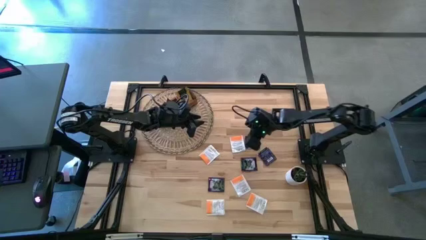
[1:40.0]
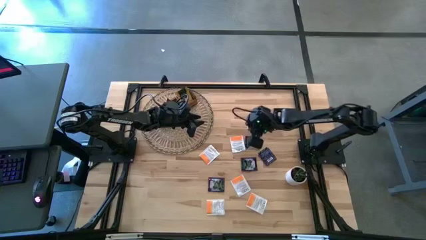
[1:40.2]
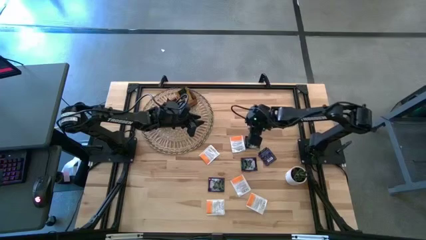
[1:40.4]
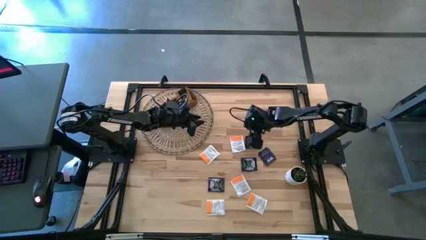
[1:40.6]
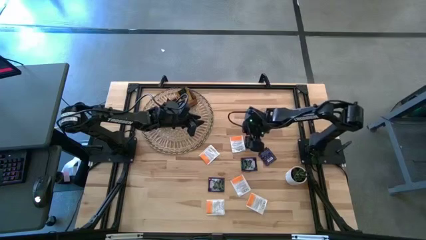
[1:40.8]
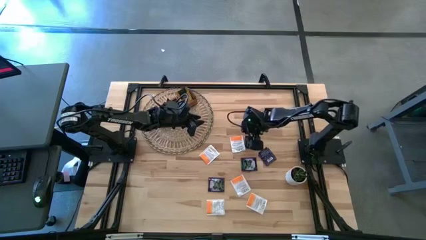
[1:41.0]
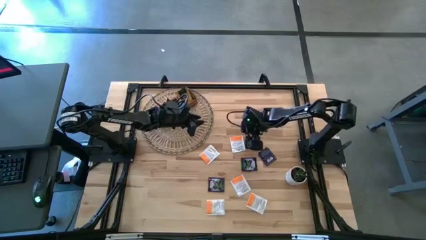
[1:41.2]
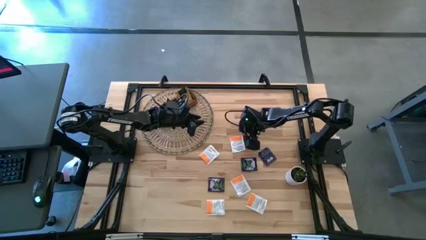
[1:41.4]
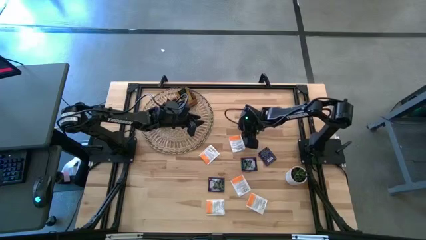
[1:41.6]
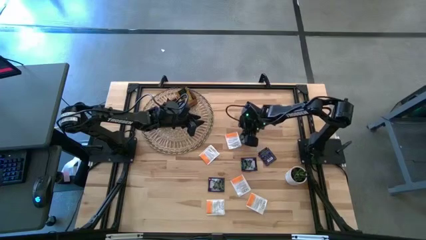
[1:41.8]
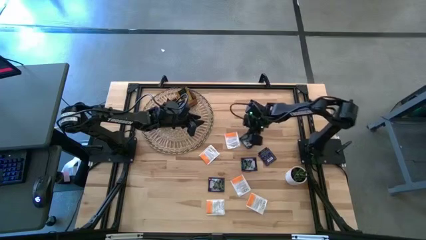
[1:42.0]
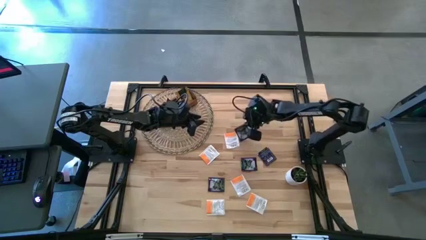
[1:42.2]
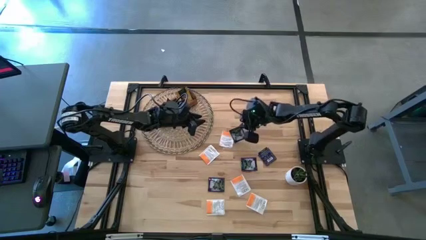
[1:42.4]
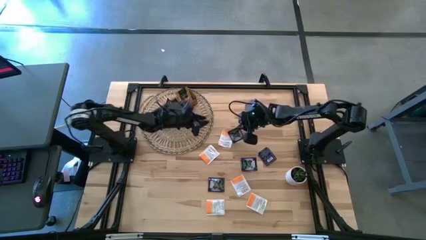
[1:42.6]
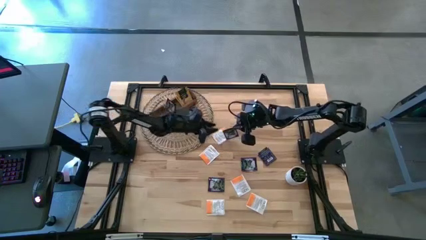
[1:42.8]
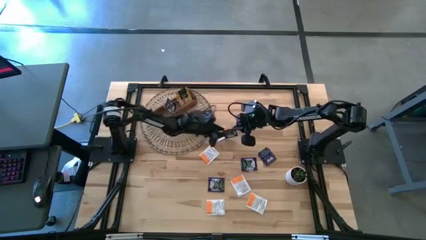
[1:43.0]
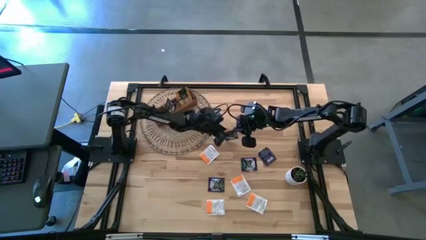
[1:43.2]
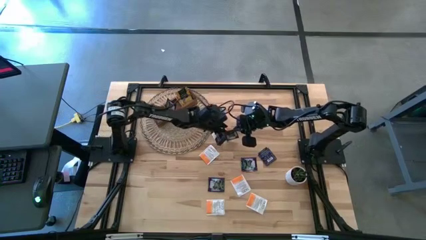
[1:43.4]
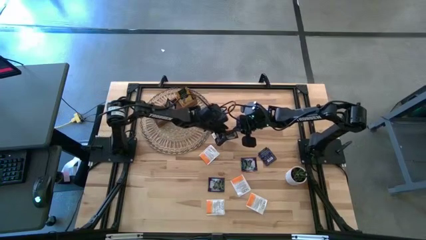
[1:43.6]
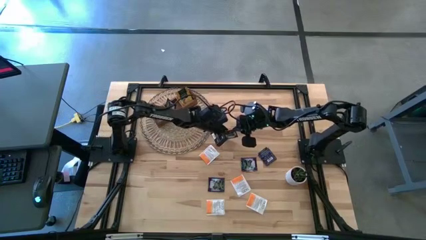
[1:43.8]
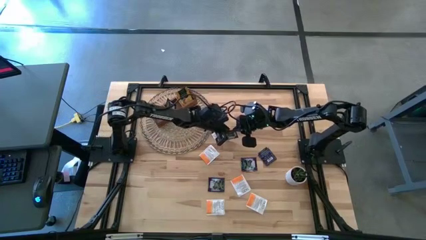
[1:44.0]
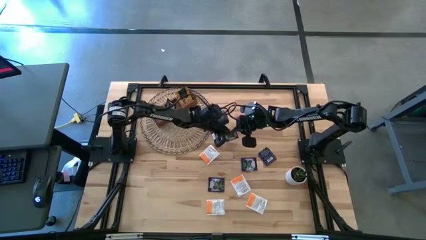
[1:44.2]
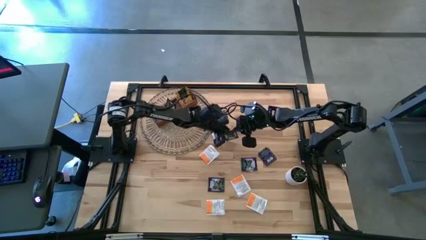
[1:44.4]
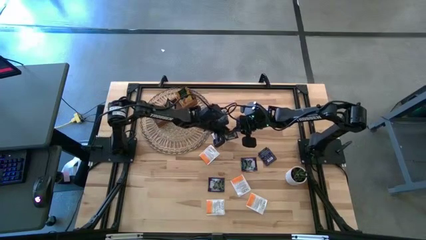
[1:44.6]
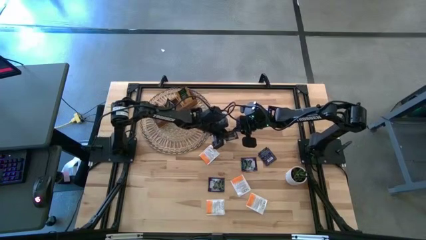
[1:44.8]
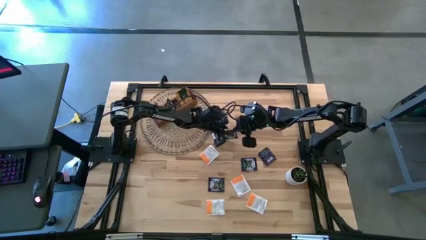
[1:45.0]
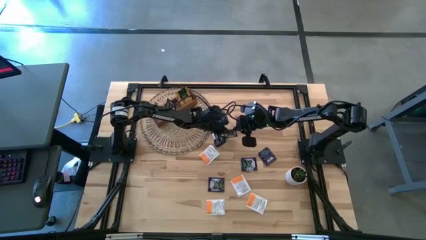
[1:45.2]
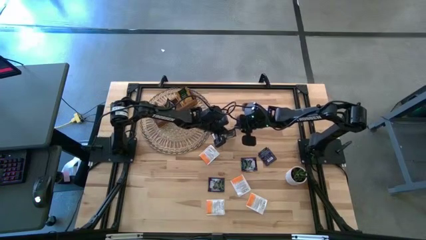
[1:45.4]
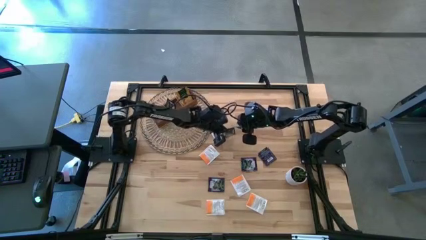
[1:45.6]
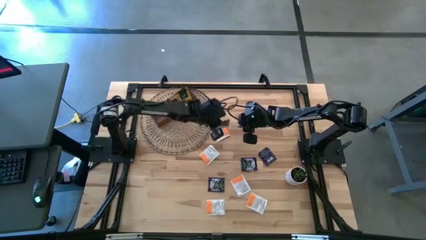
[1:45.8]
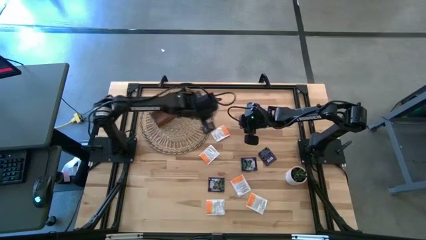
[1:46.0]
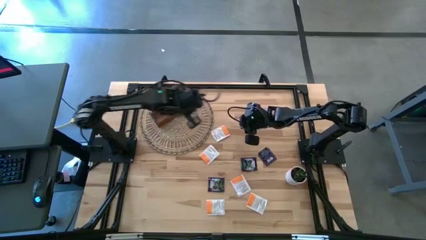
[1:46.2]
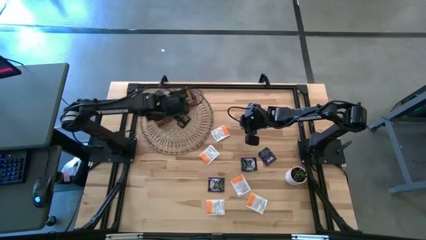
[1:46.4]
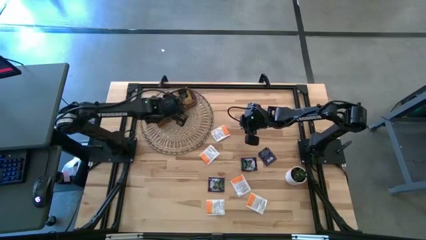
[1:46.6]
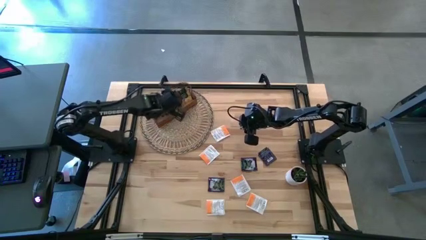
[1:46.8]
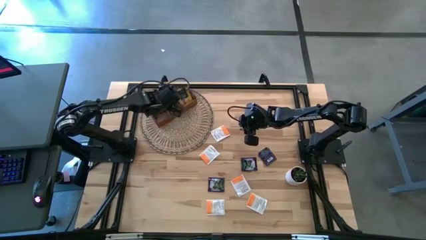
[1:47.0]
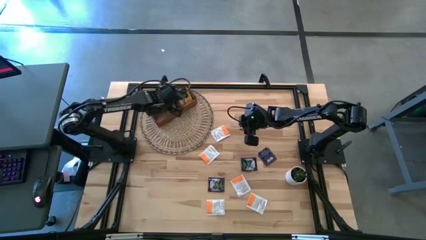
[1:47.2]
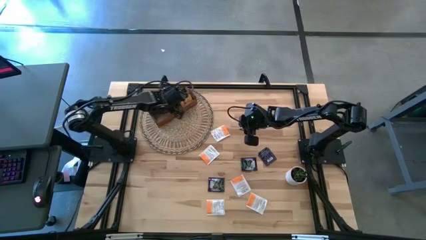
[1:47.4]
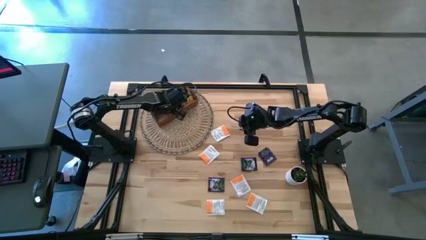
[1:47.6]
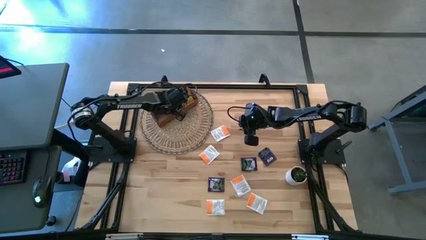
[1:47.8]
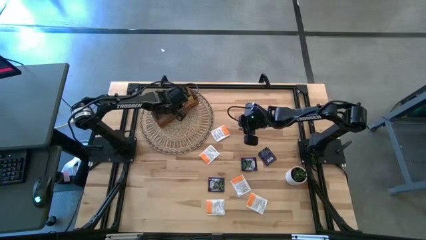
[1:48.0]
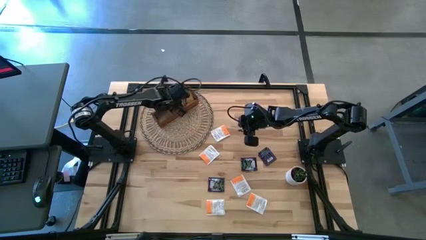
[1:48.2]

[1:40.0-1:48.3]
Task: Pick & Place Tea
Put the purple tea bag into the middle section of the wooden organizer

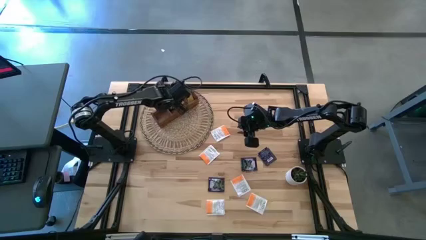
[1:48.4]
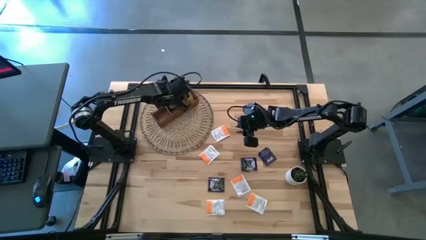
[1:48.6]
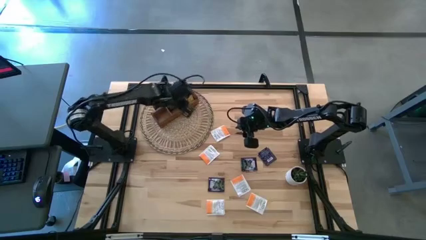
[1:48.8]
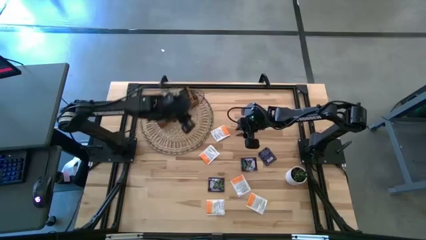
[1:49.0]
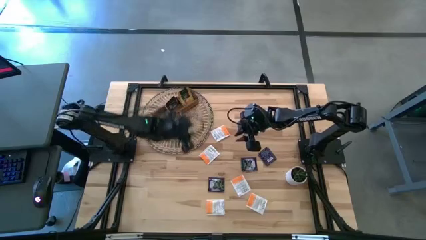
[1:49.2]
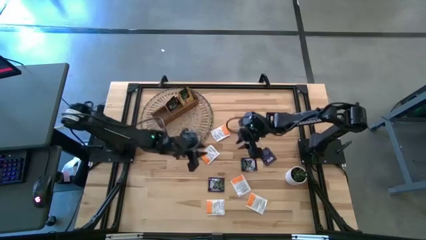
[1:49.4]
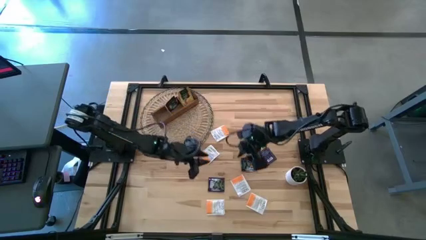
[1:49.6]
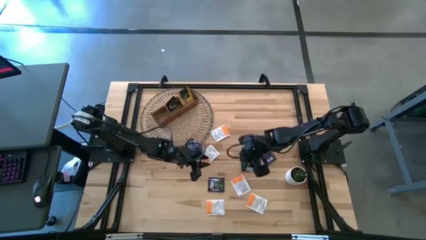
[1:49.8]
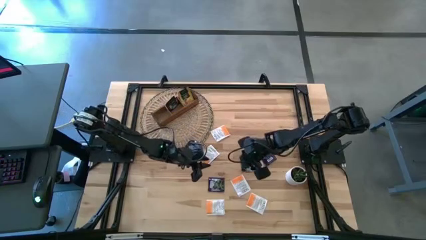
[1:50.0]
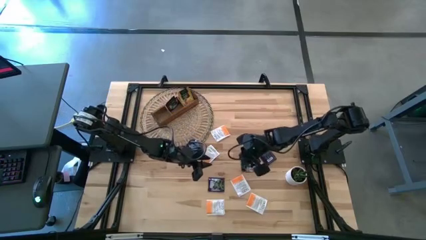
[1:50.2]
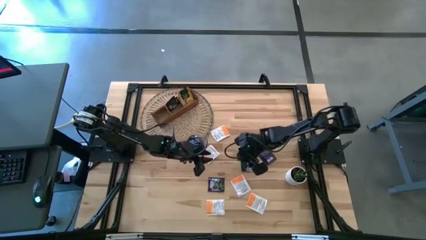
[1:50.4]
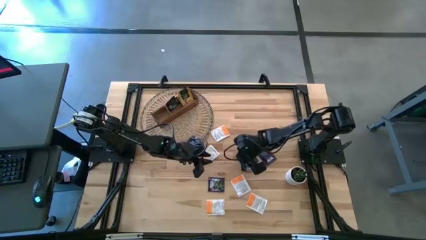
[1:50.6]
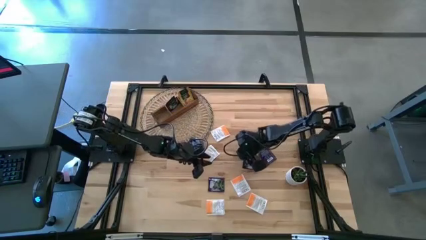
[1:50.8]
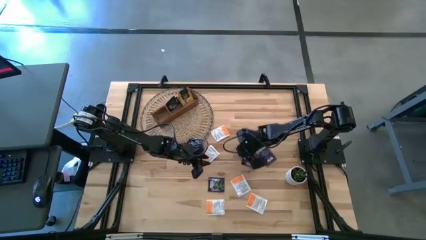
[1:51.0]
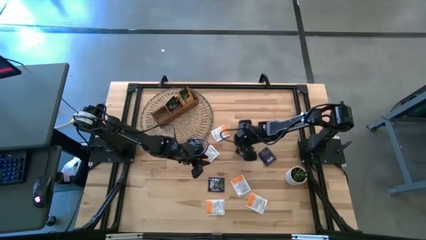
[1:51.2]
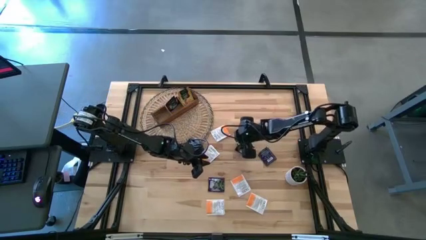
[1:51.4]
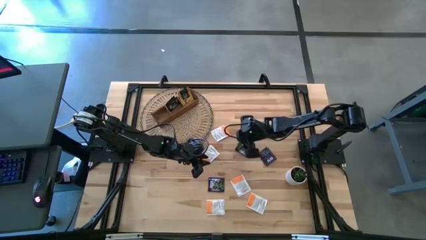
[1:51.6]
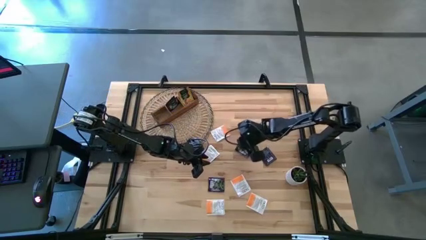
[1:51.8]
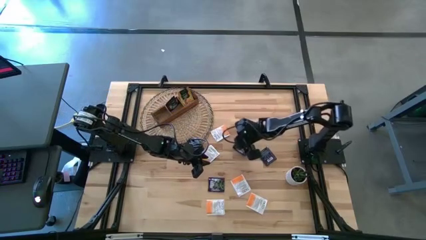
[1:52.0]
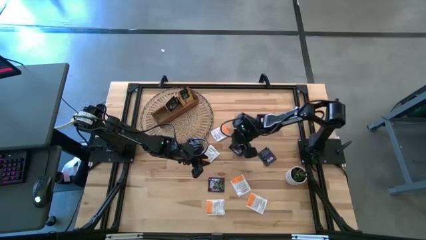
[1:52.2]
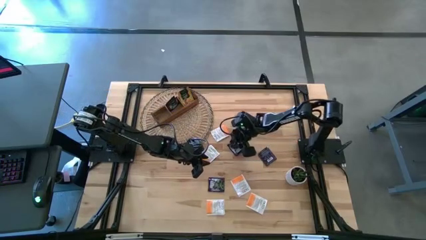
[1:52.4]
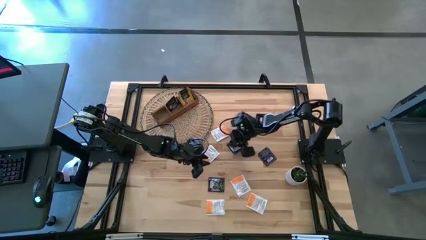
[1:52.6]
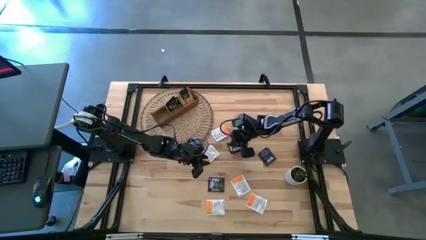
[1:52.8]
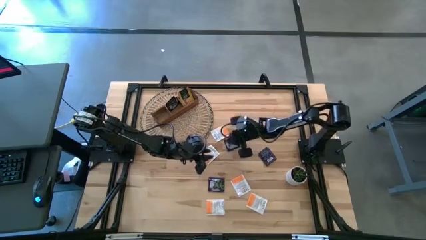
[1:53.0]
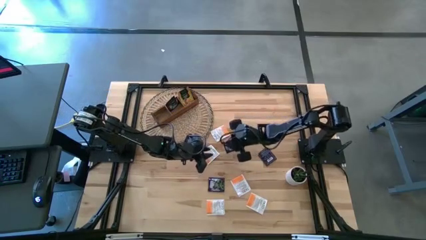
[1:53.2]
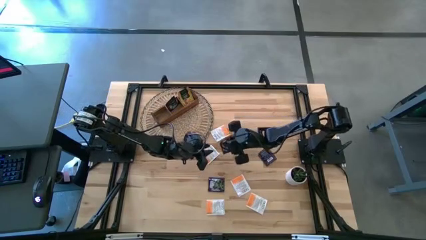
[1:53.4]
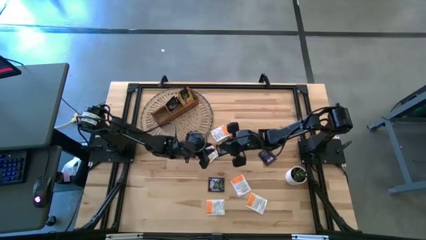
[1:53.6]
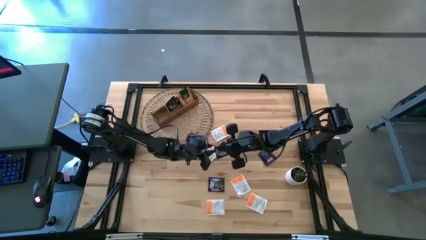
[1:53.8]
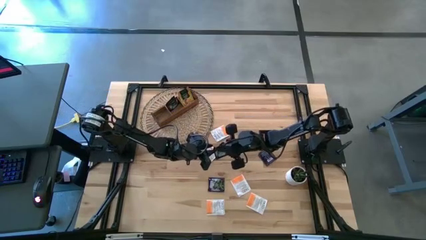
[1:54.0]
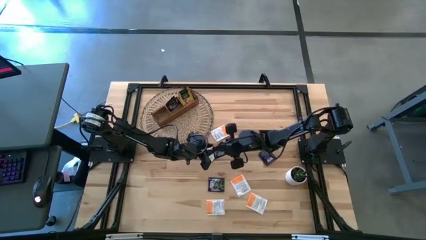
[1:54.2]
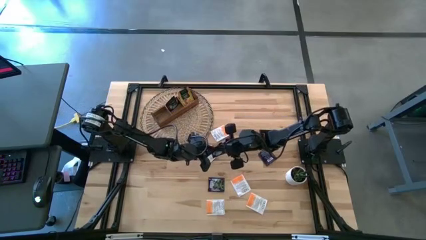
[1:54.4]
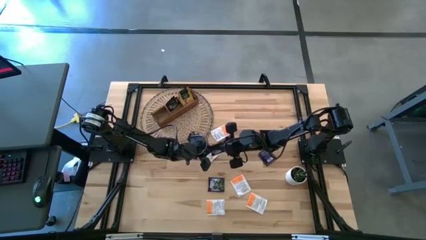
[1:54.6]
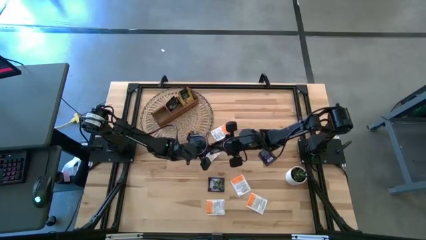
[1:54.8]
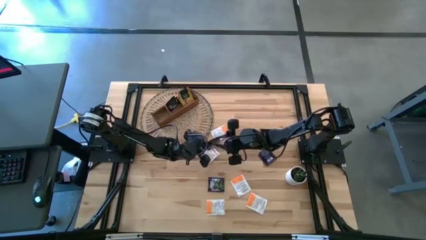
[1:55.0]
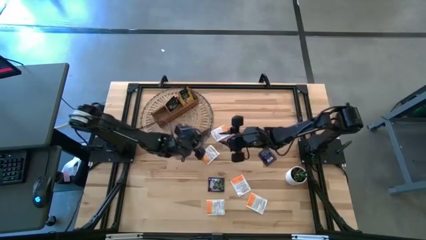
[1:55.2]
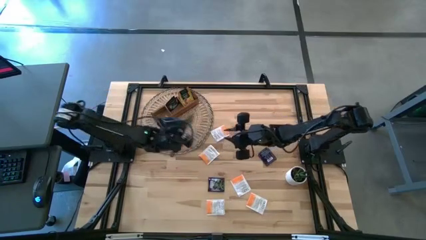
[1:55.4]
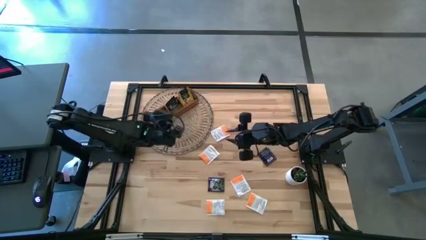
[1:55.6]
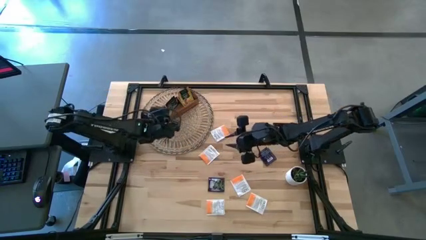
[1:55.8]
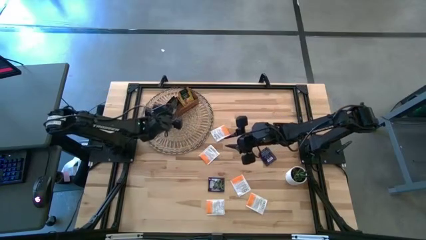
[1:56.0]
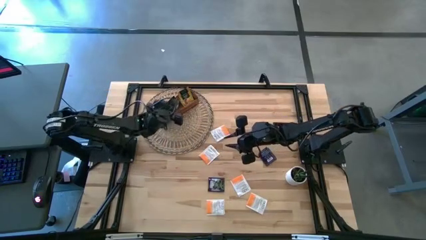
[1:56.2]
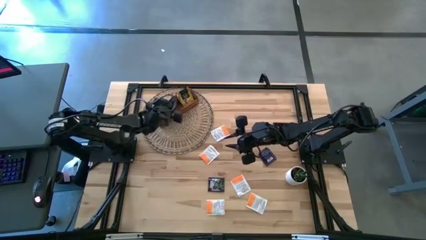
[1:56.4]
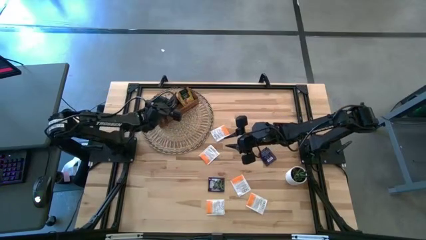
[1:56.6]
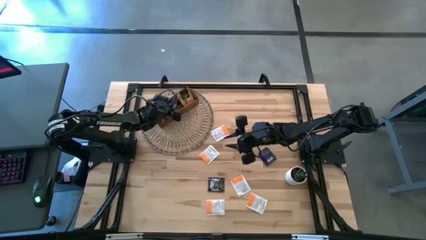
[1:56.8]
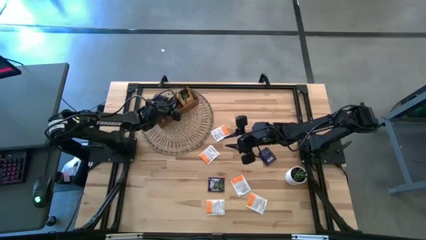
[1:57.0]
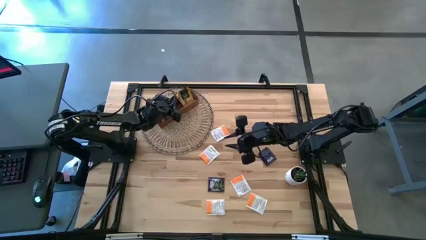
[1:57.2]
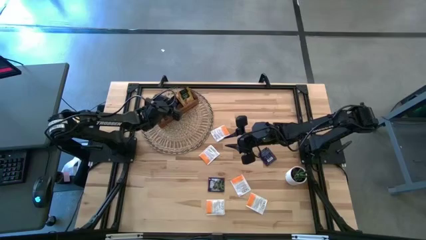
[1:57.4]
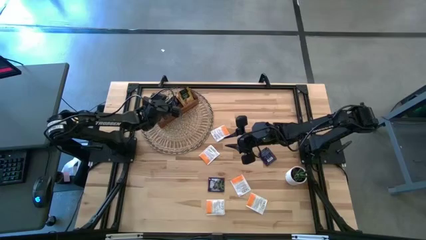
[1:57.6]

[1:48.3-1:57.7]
Put the purple tea bag into the middle section of the wooden organizer
